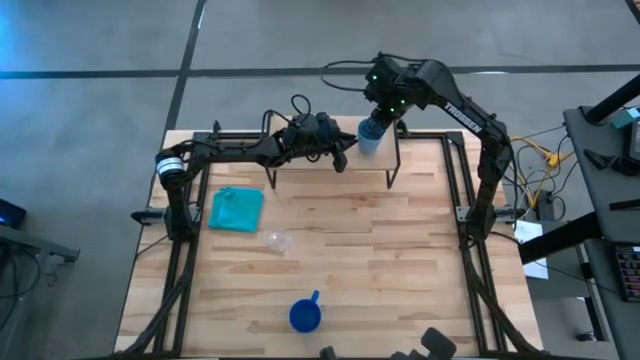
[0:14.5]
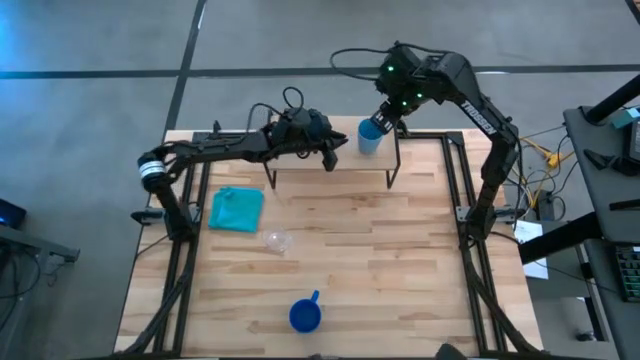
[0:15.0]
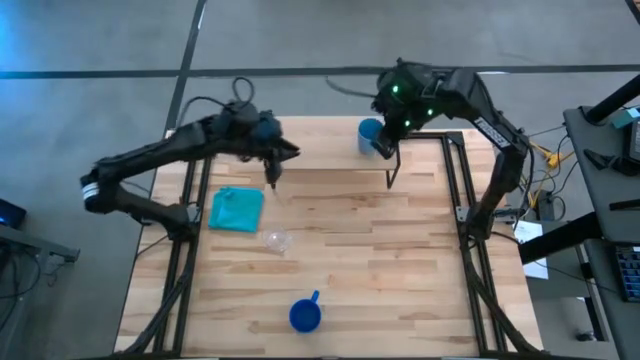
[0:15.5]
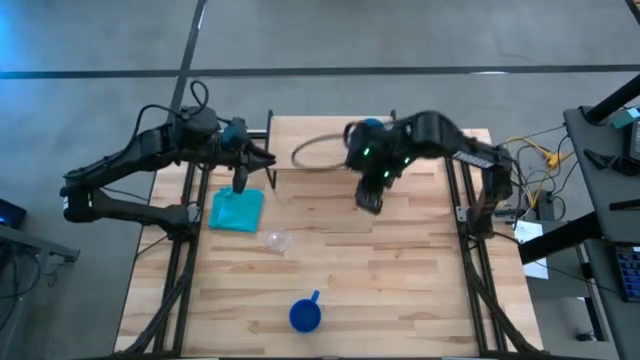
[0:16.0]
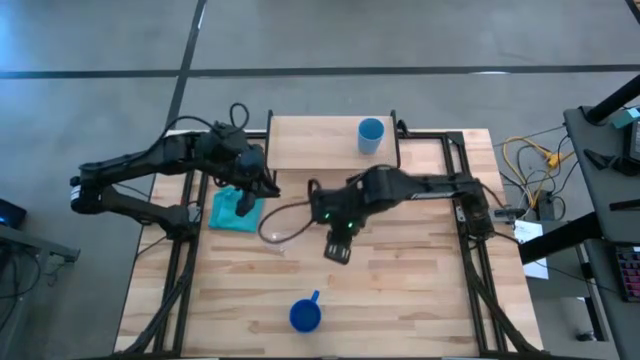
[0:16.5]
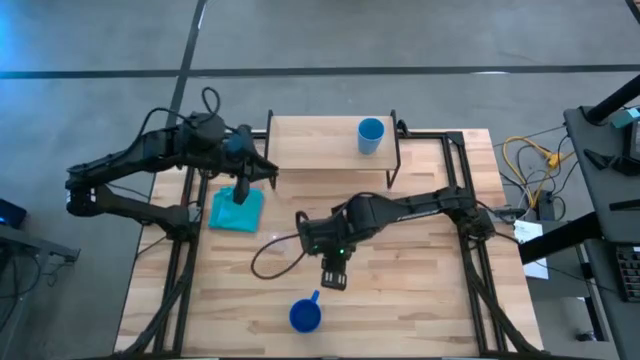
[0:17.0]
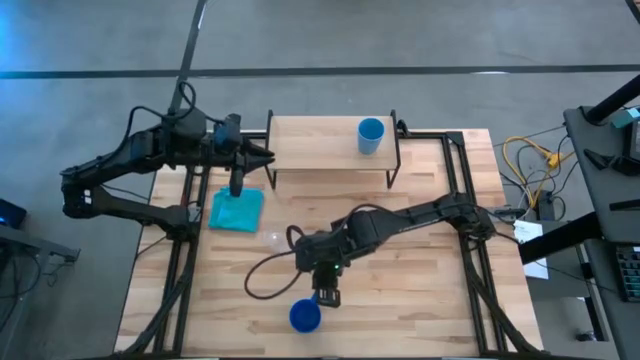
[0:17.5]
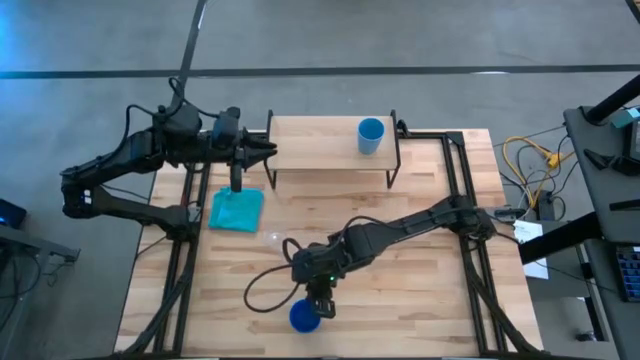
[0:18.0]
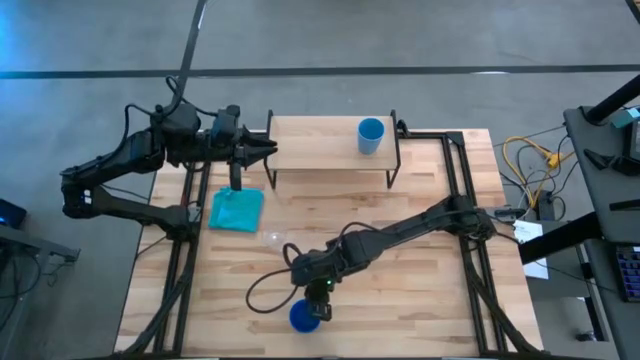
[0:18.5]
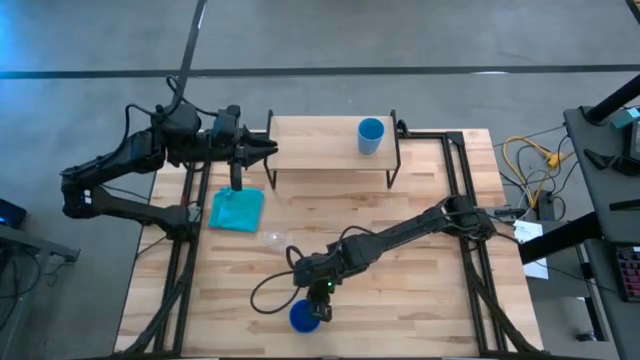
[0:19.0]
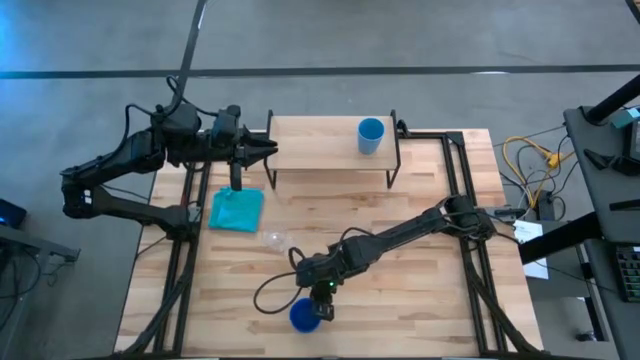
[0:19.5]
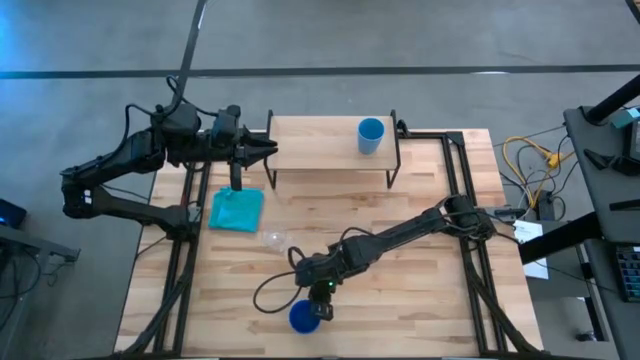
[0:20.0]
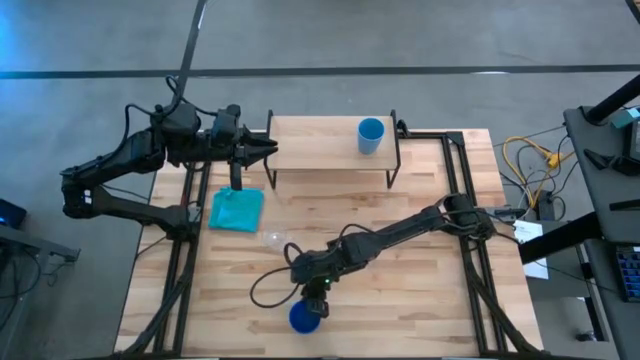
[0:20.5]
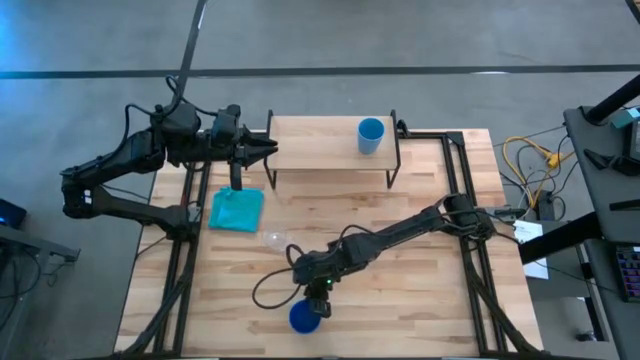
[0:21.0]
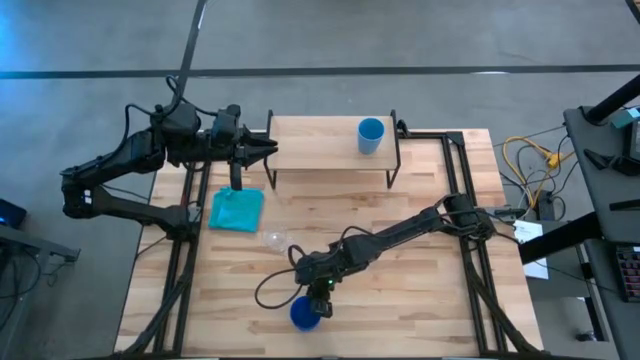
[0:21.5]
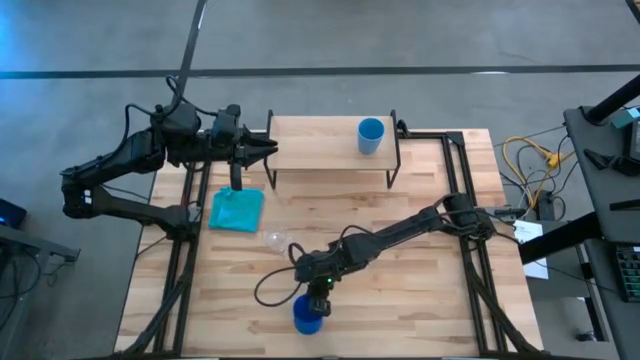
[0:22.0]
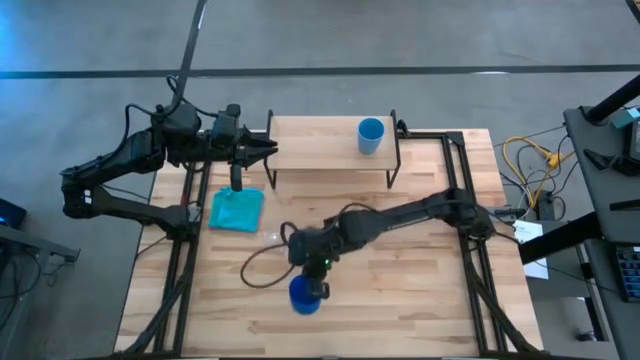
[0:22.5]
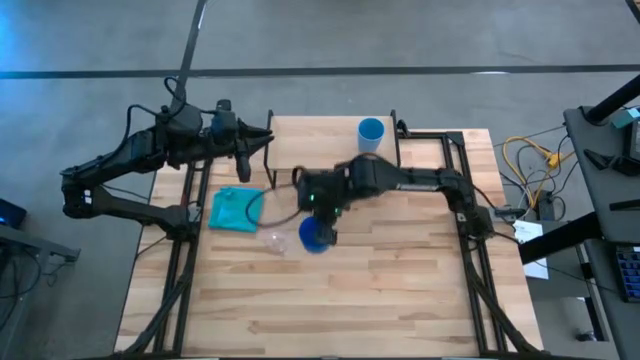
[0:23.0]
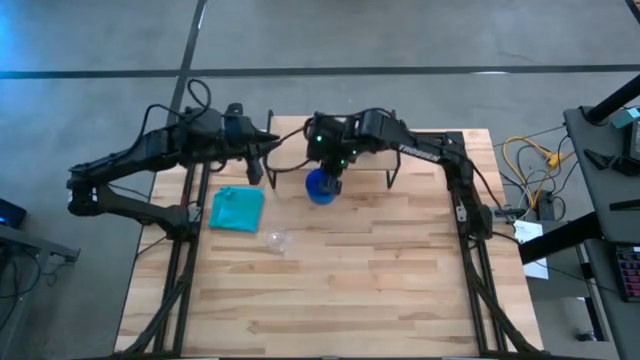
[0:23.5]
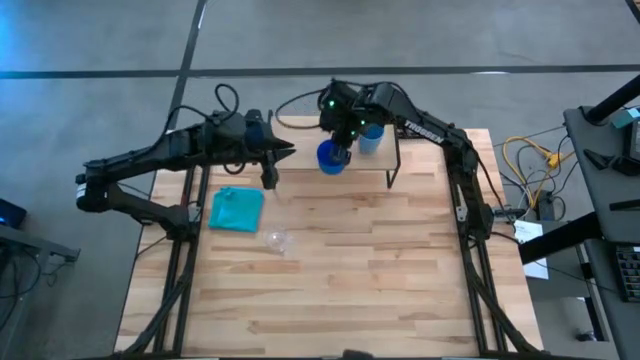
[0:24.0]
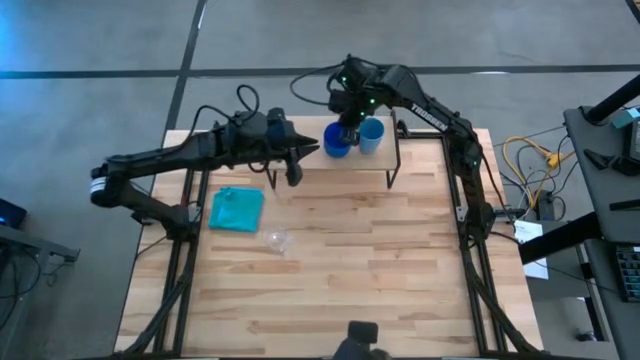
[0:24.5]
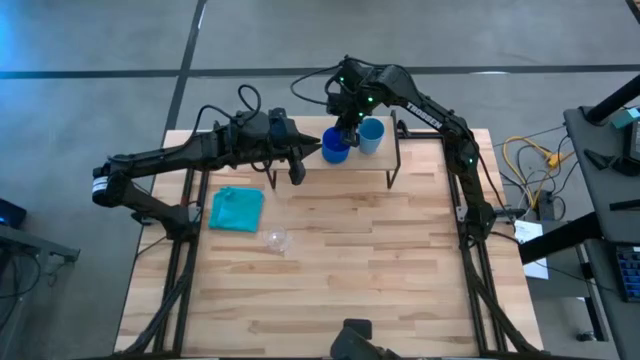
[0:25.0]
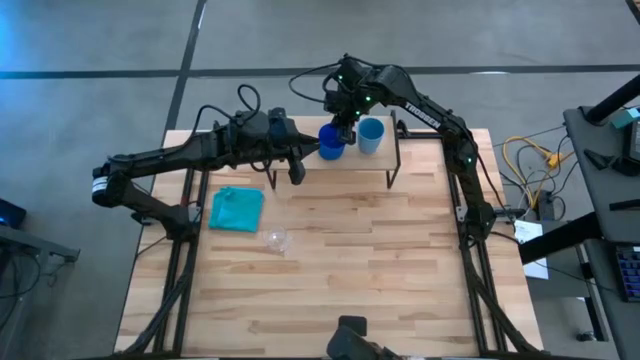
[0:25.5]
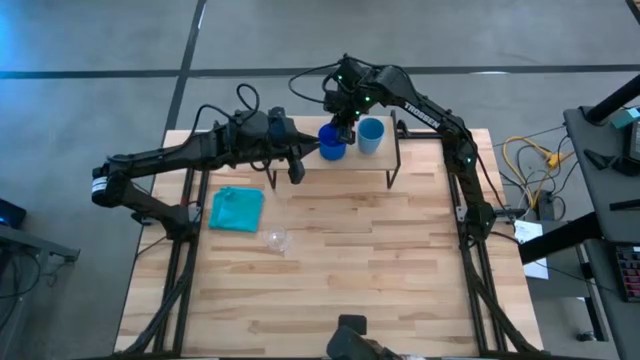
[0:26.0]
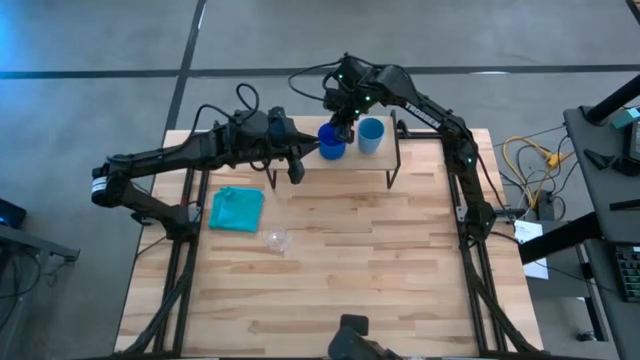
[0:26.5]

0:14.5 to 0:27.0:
Task: Stack small to large cups/mugs on shelf
Put the blue mug on the shelf

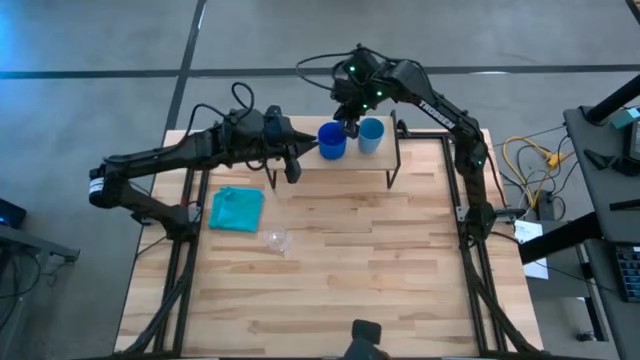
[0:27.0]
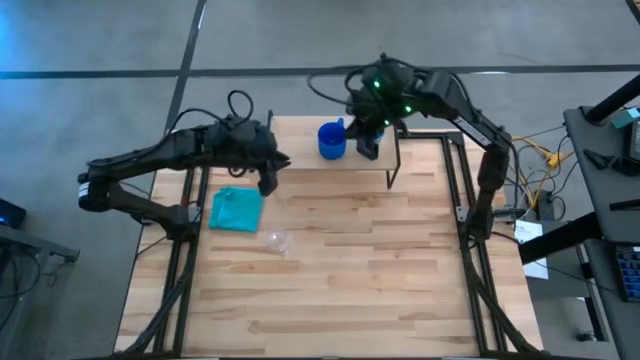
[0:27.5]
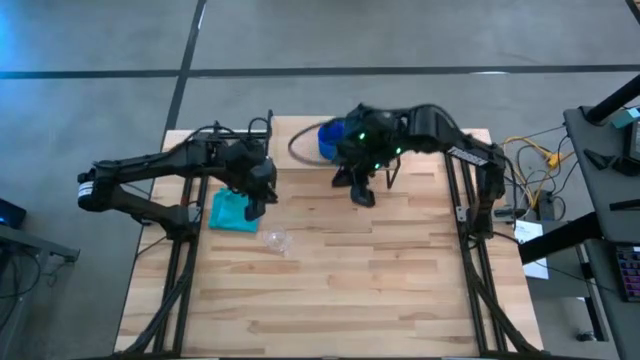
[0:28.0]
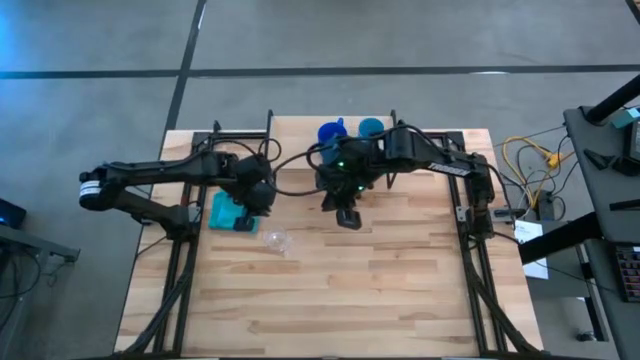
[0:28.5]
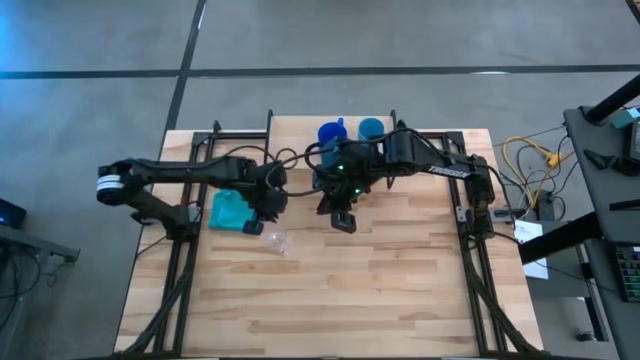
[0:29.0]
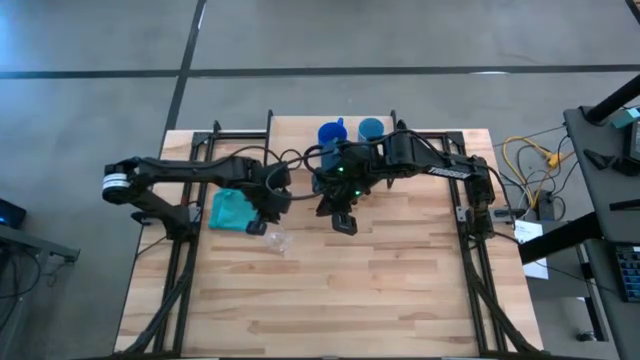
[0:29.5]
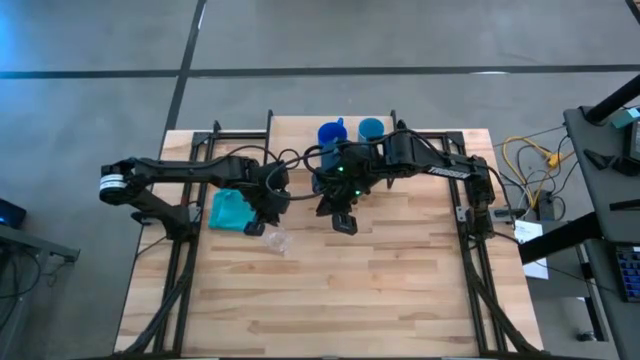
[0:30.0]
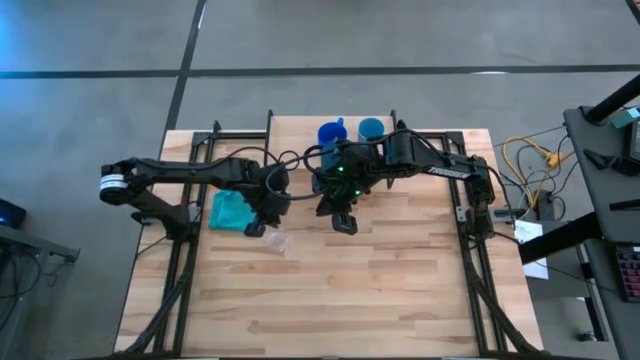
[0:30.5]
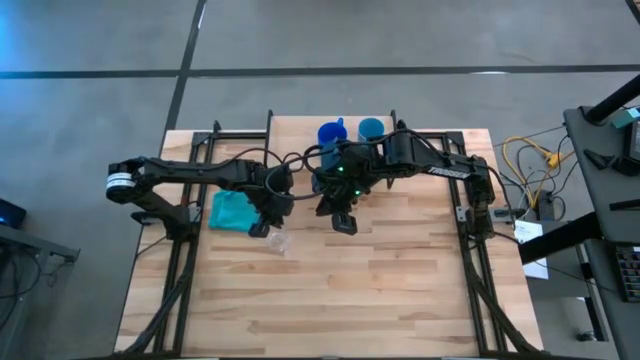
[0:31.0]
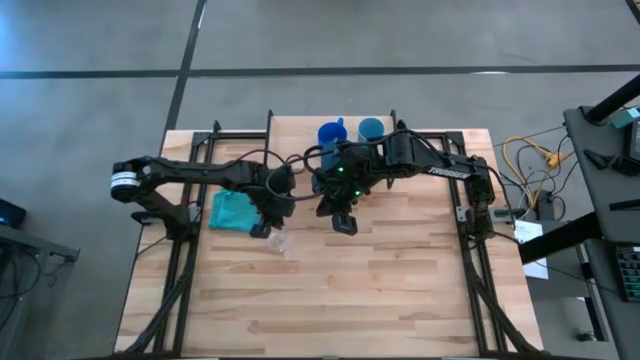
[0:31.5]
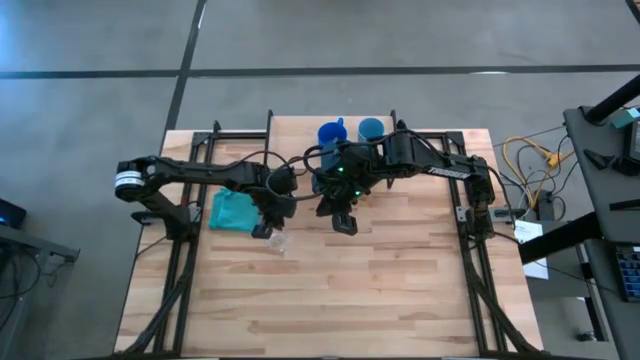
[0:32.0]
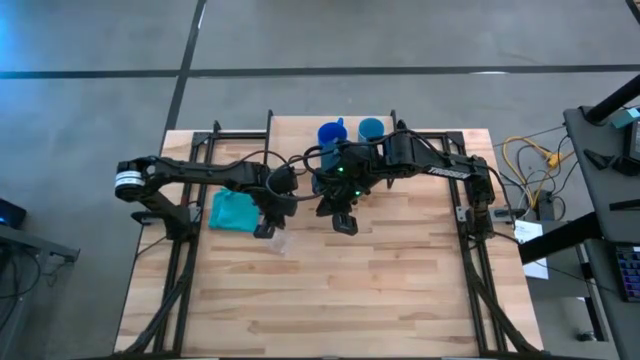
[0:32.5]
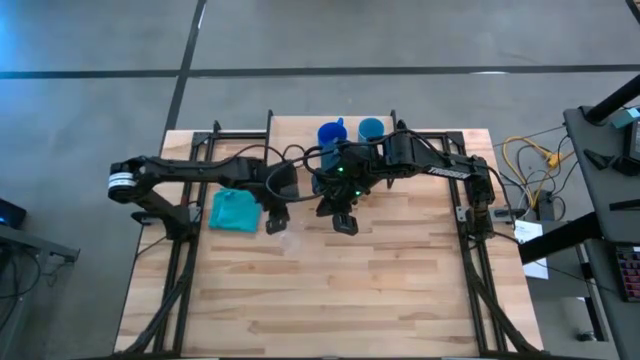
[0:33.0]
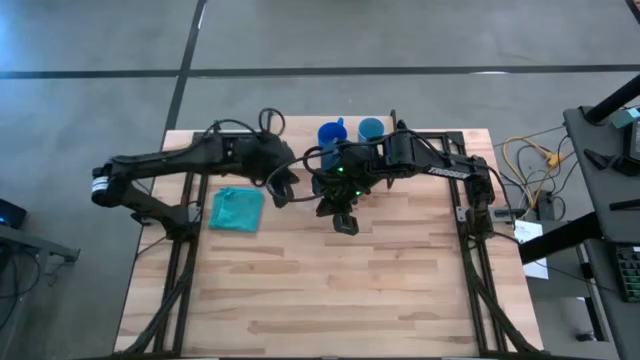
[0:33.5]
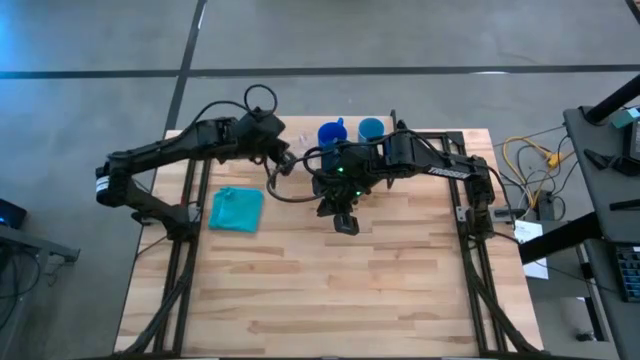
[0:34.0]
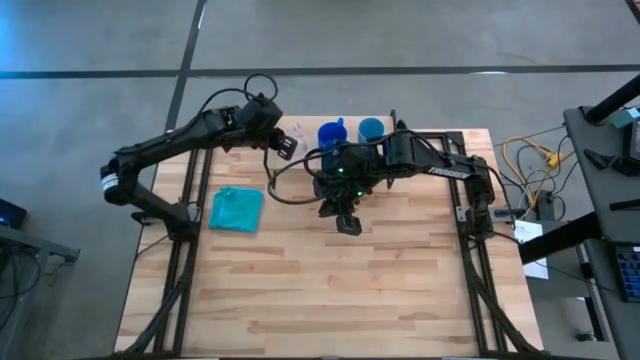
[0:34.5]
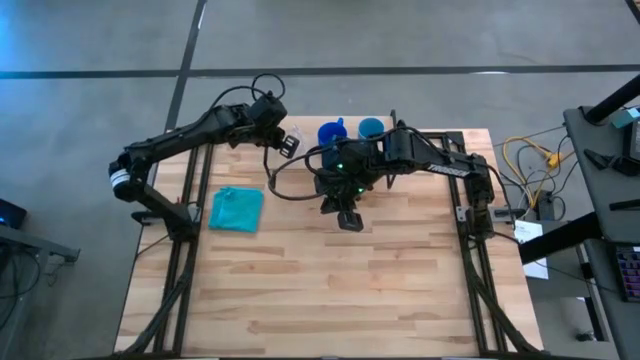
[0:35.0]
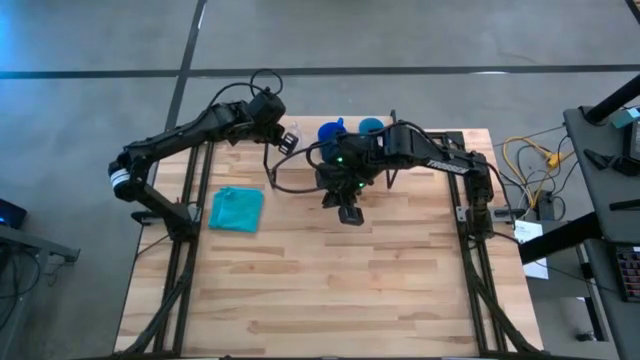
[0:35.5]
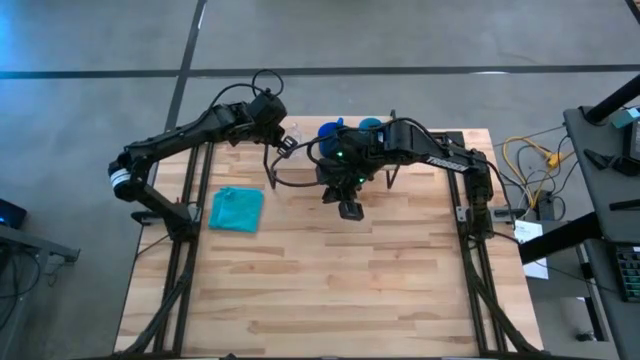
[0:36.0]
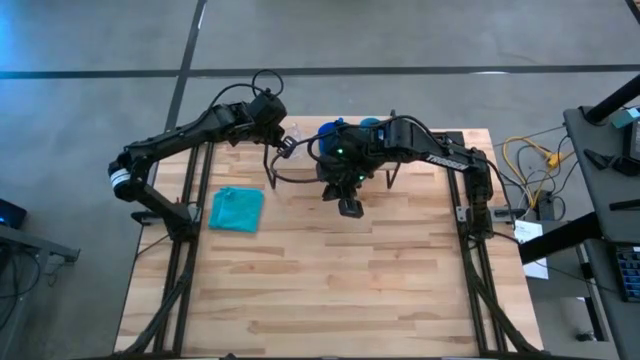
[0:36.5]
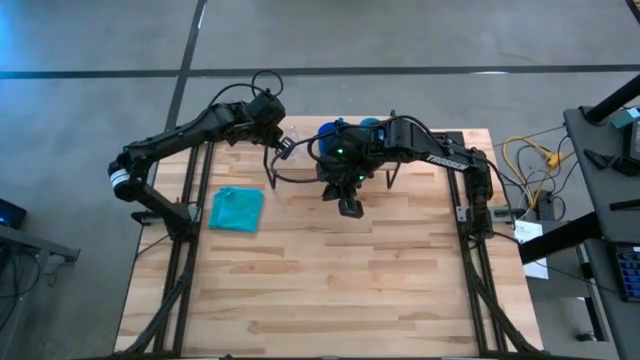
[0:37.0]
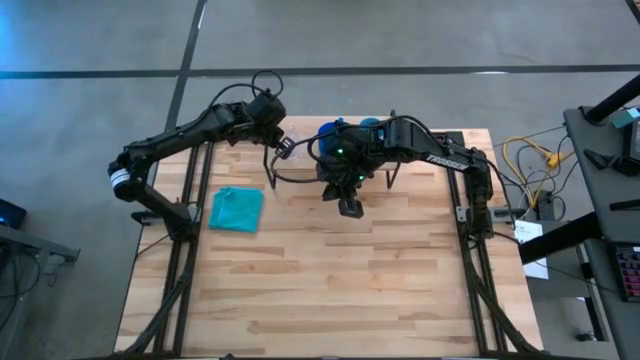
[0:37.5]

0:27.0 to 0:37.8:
Put the transparent mug on the shelf
